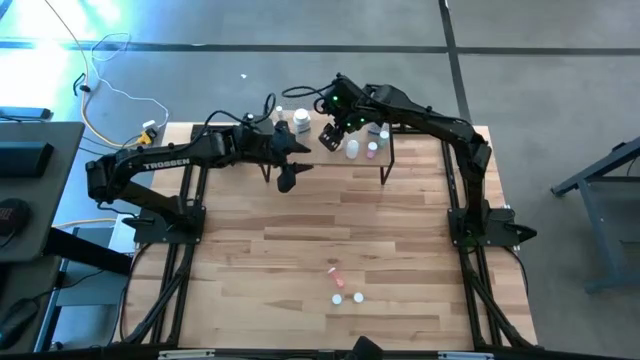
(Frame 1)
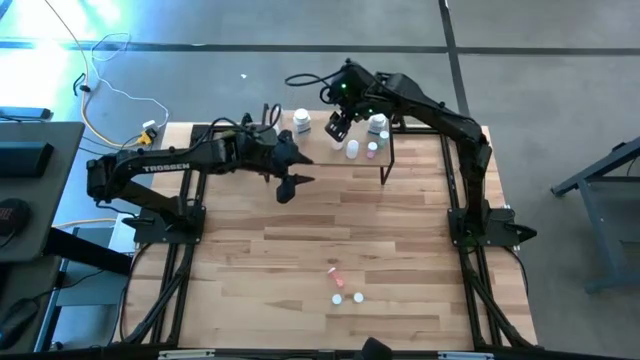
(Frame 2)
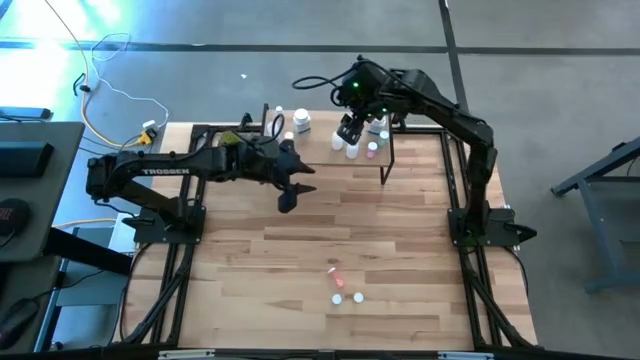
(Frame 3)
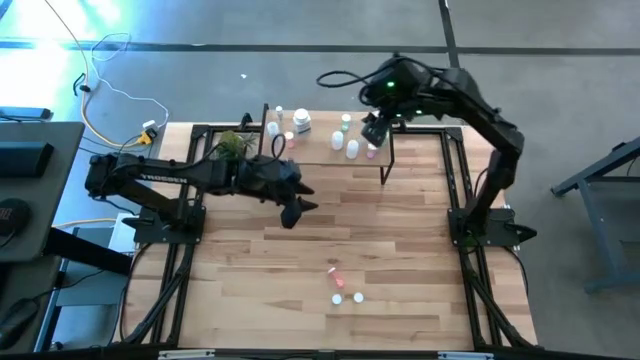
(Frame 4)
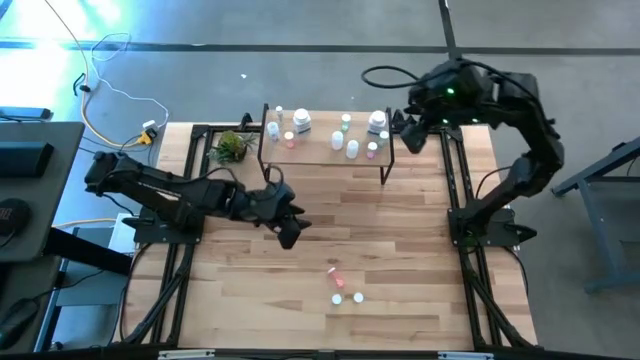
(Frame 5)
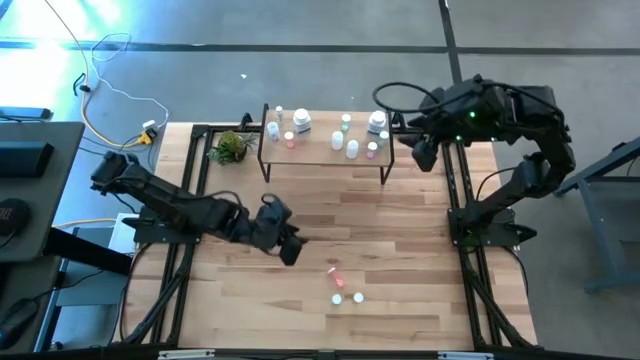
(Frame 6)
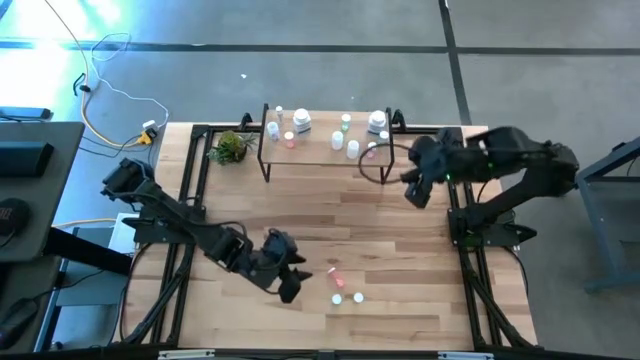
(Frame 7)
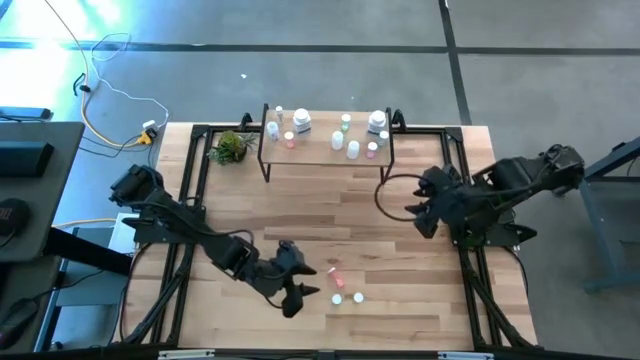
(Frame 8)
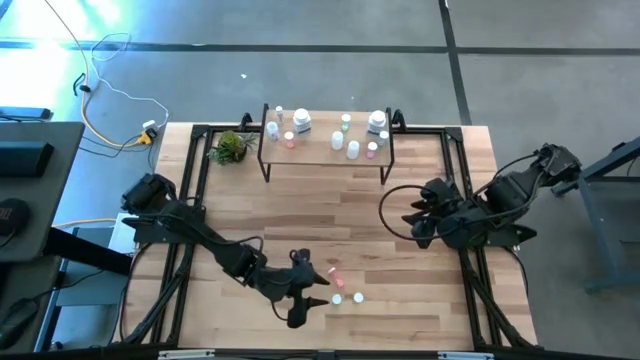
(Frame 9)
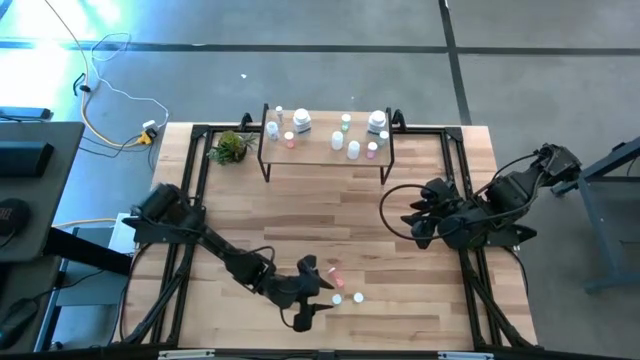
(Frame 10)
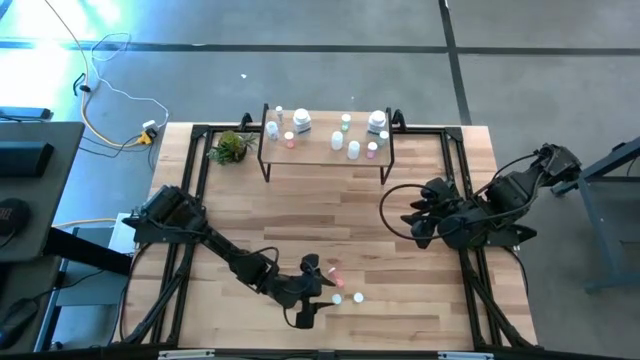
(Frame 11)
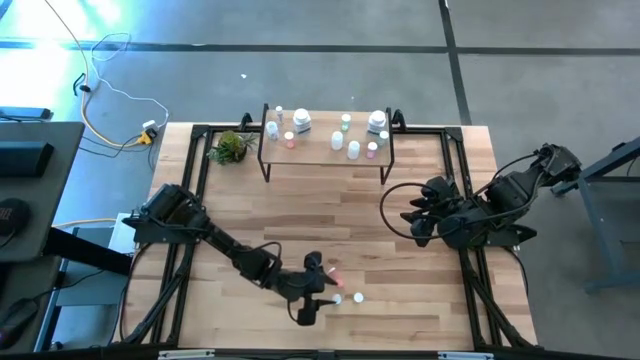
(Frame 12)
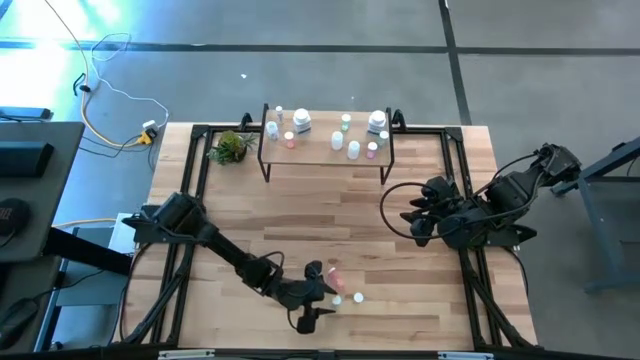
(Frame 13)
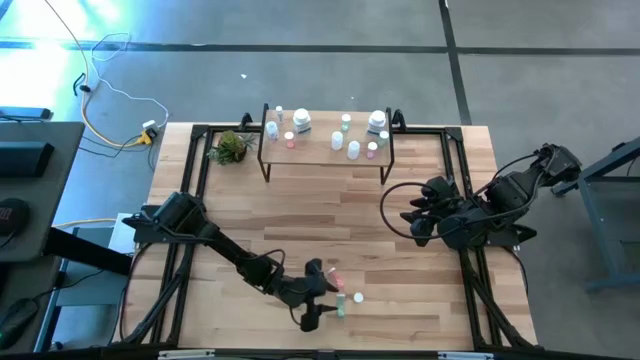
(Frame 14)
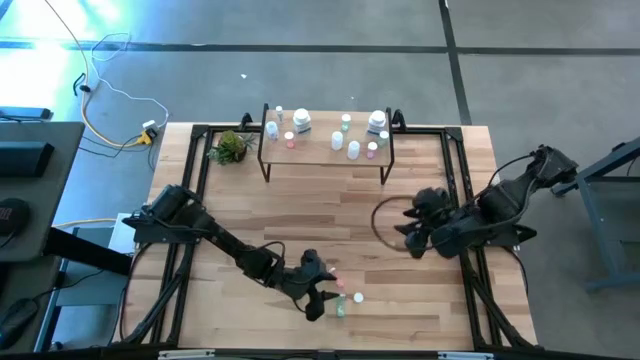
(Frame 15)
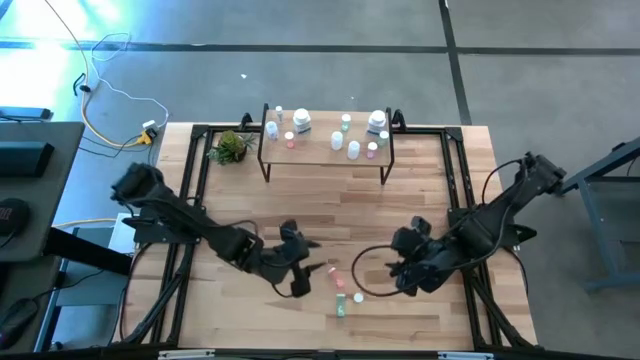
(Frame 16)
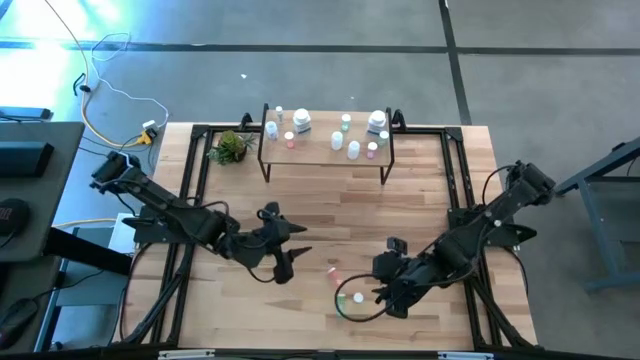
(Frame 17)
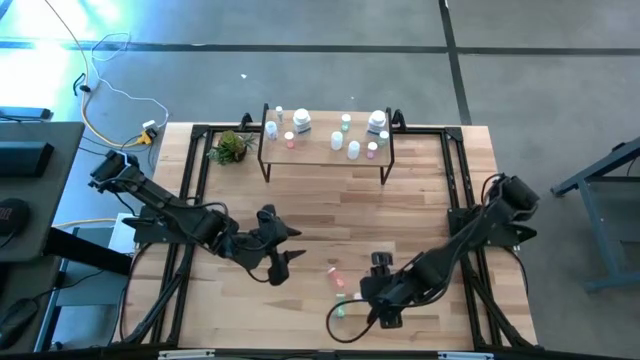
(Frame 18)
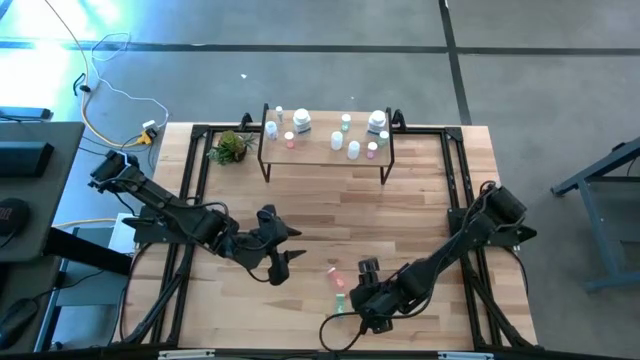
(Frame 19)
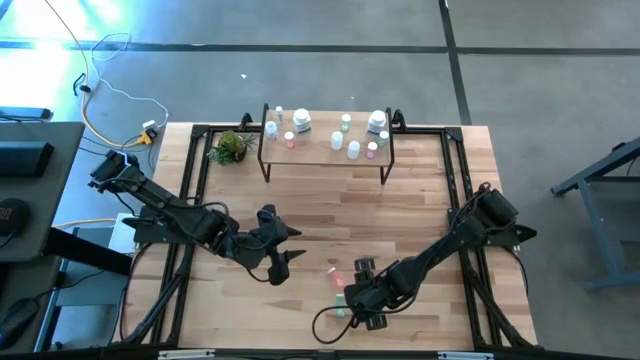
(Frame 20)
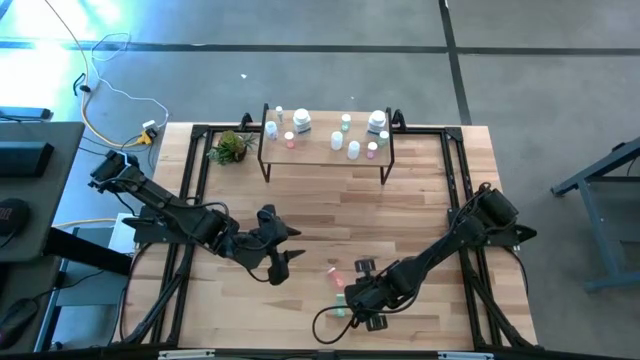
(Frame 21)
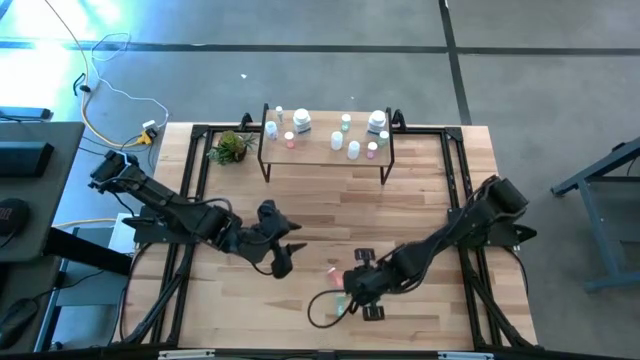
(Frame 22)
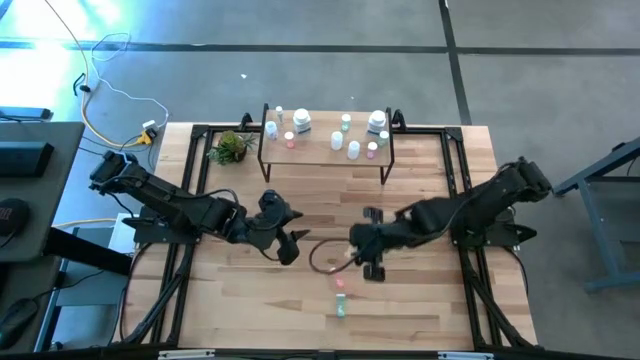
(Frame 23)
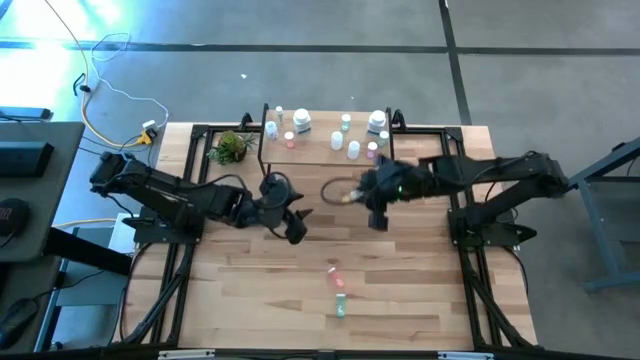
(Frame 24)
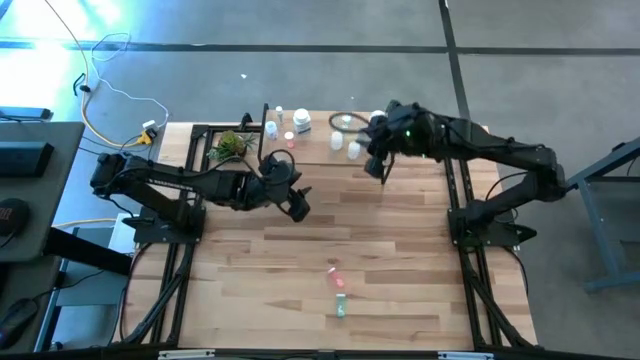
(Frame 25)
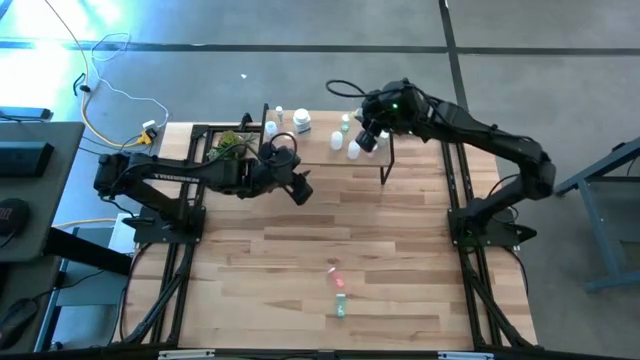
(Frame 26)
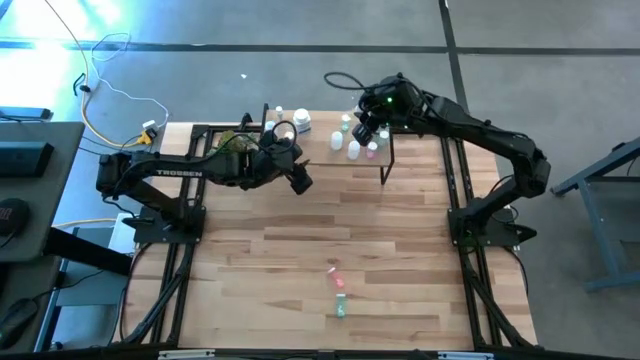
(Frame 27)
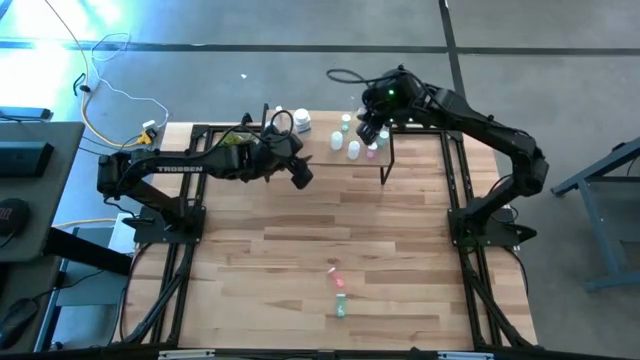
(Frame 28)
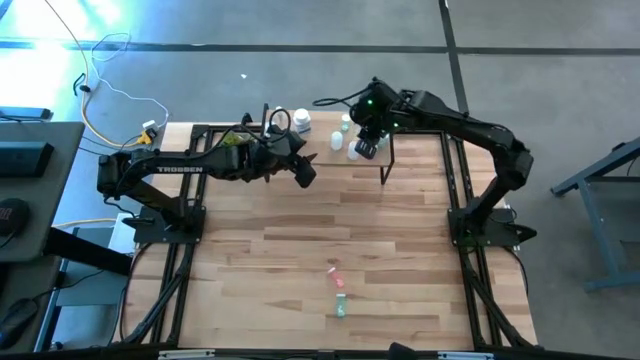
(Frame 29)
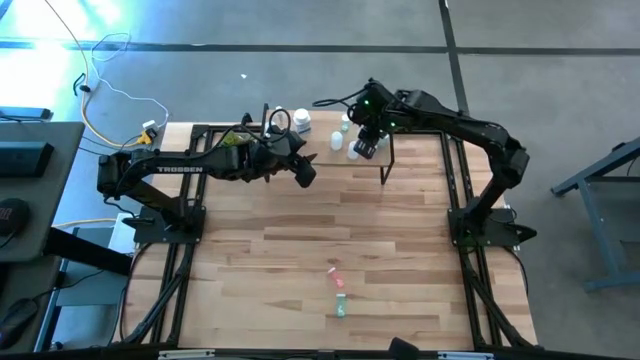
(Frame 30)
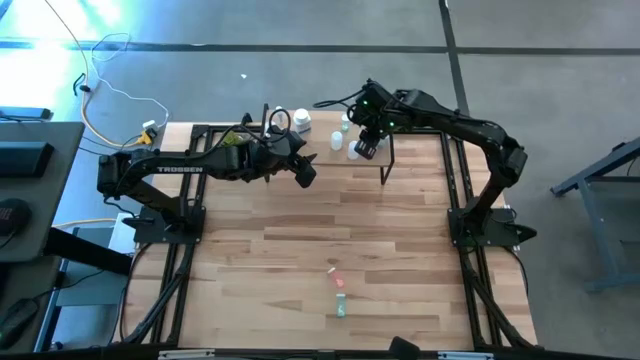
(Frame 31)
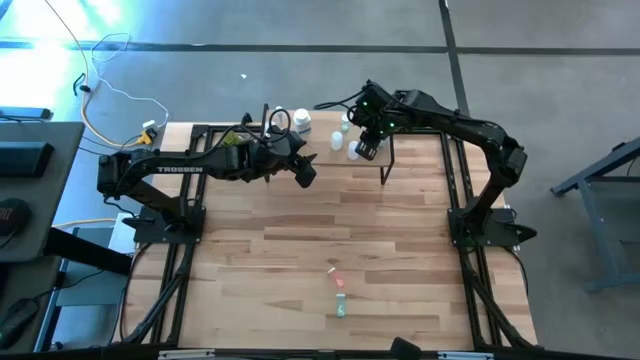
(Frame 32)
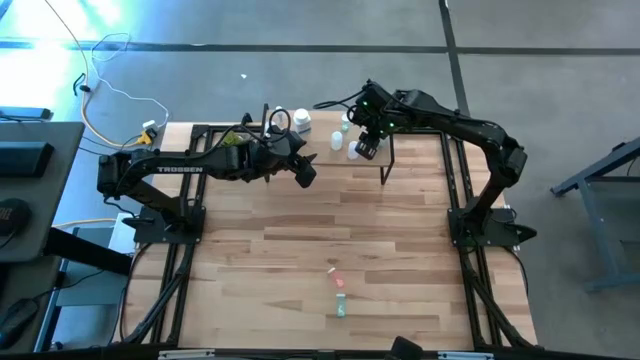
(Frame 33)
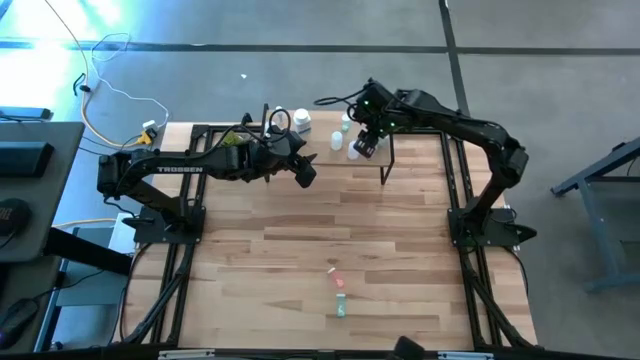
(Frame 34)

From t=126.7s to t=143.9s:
Task: Pick and place medicine bottles onto shelf by color
Put the yellow pill bottle on the shelf

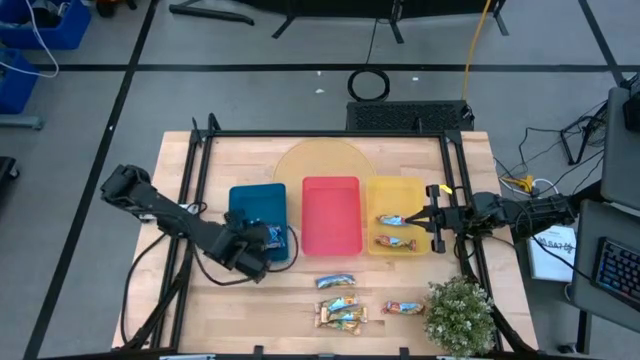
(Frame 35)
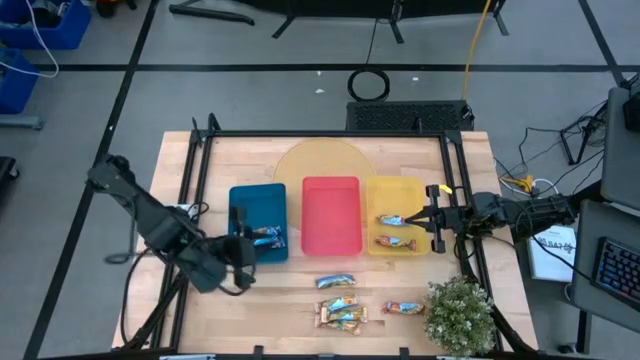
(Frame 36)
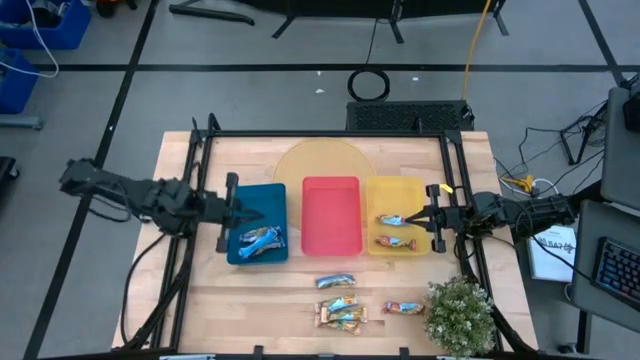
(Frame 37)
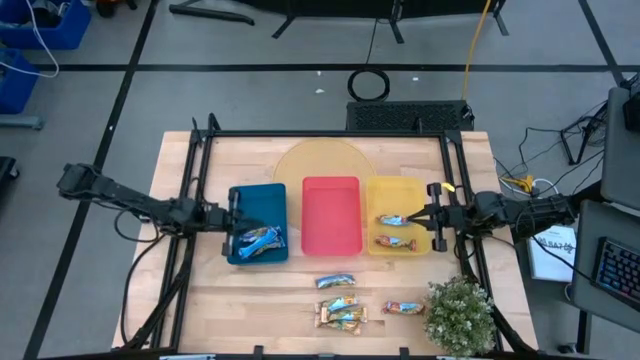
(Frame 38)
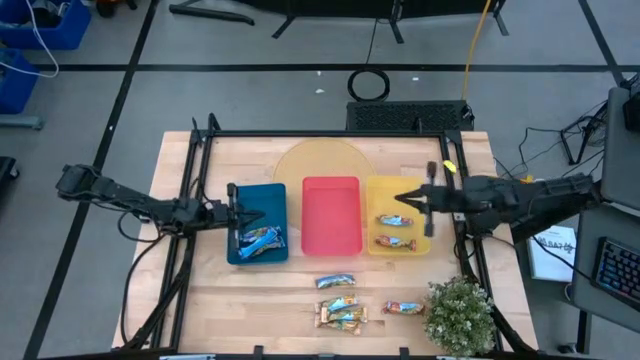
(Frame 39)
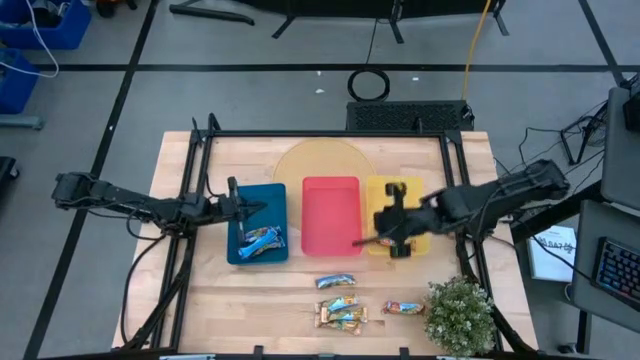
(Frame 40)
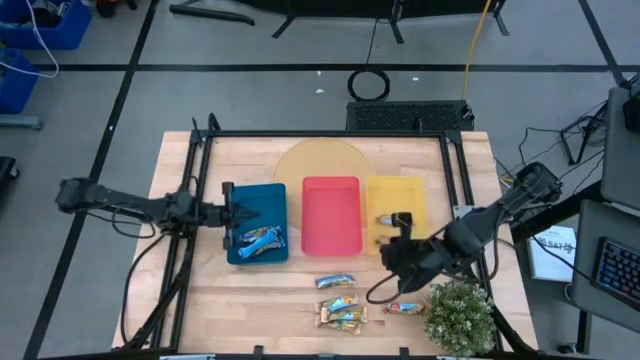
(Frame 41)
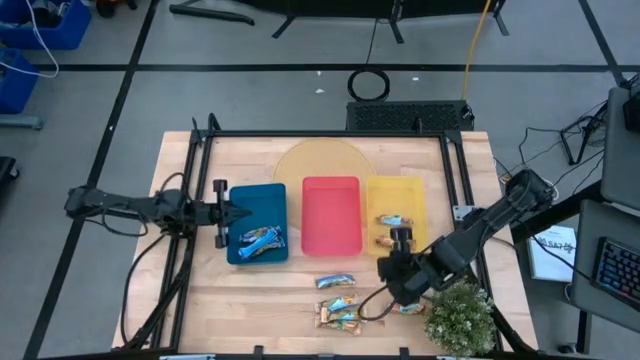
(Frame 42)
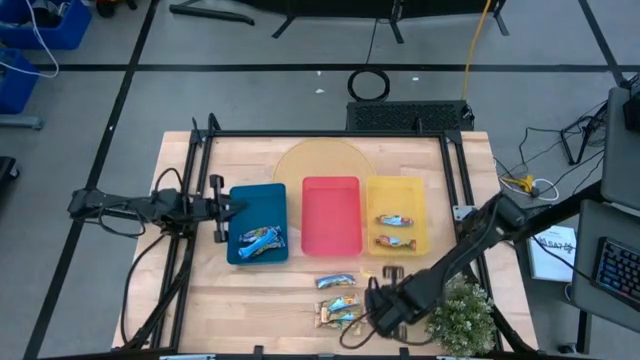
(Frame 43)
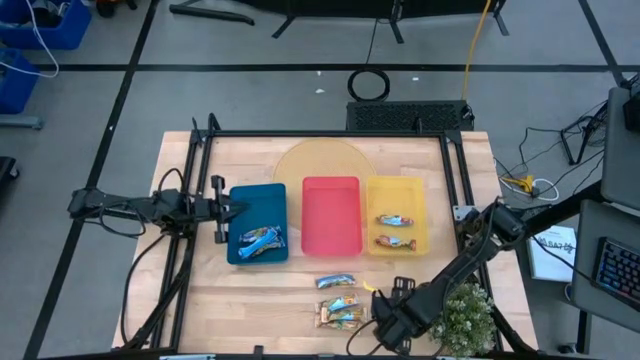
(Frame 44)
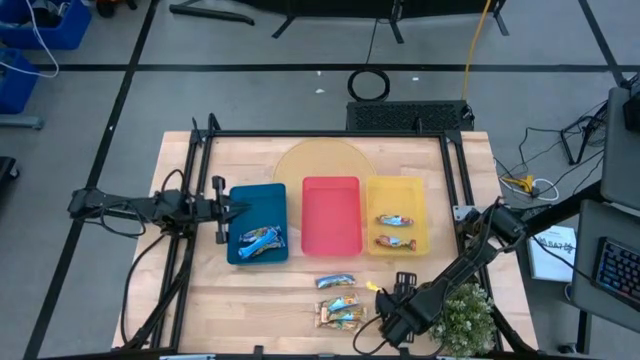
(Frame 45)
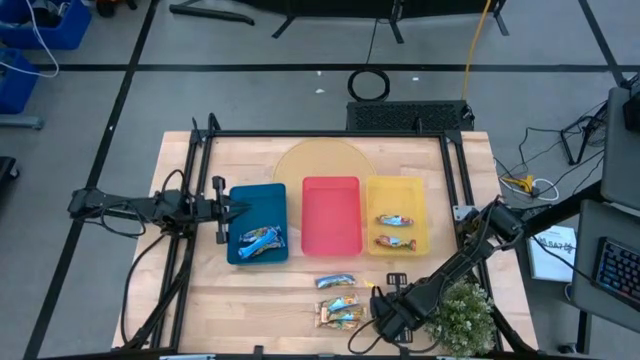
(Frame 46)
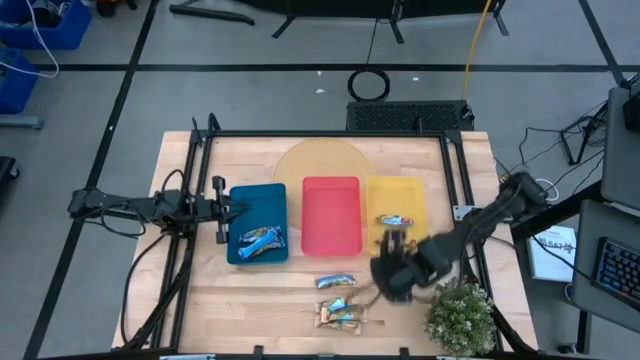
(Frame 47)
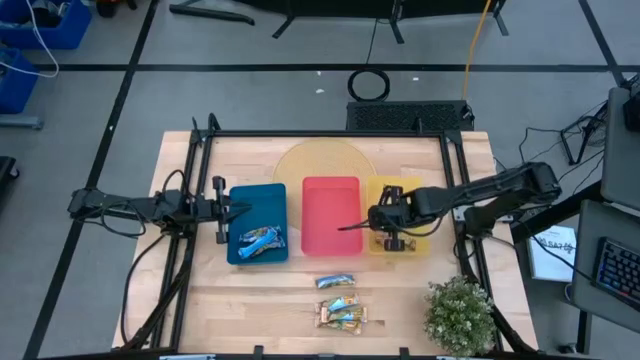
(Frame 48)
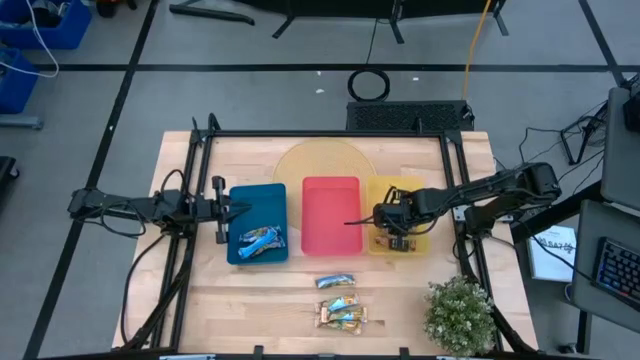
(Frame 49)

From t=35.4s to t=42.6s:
Task: Pick and place Granola Bars by type
Put the red granola bar into the yellow bin
